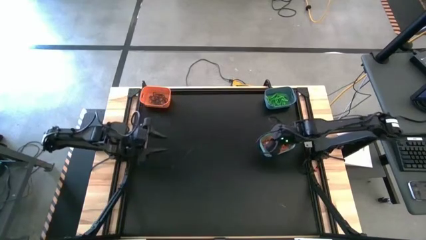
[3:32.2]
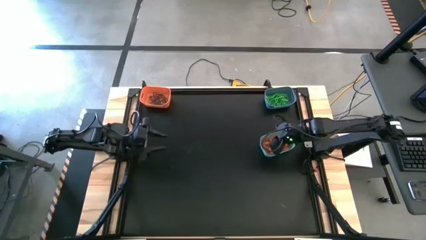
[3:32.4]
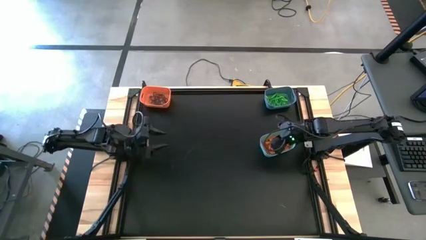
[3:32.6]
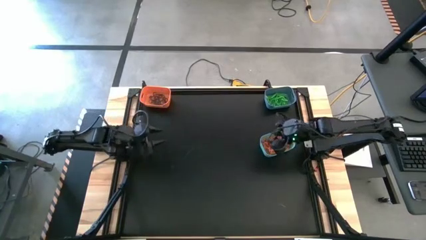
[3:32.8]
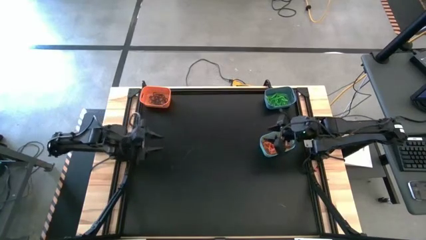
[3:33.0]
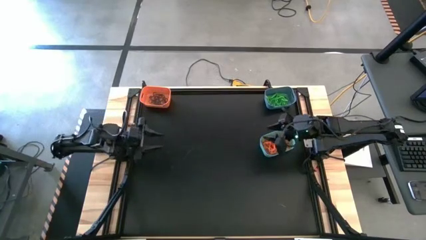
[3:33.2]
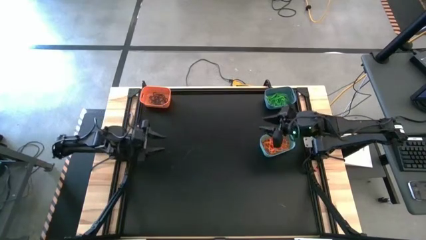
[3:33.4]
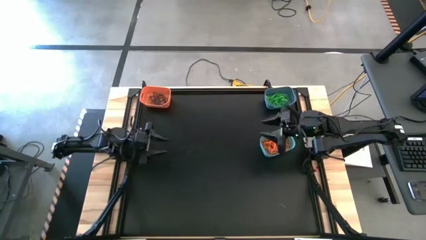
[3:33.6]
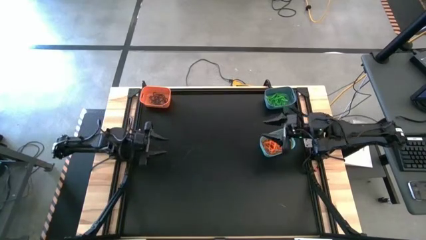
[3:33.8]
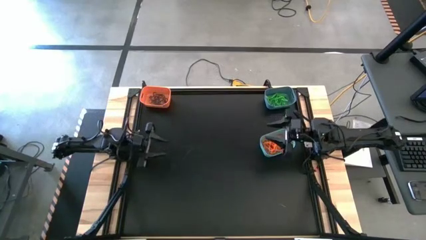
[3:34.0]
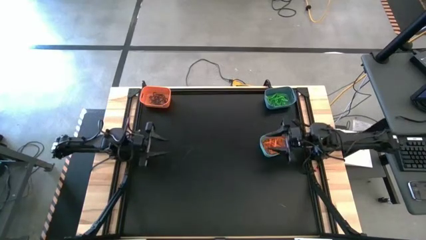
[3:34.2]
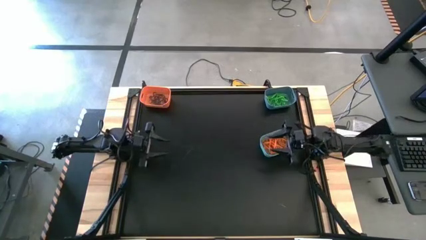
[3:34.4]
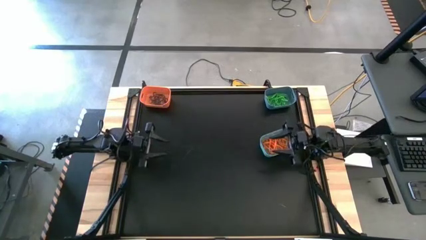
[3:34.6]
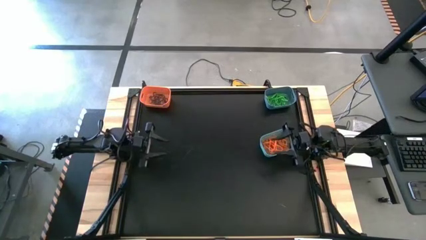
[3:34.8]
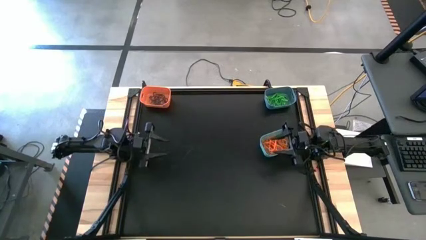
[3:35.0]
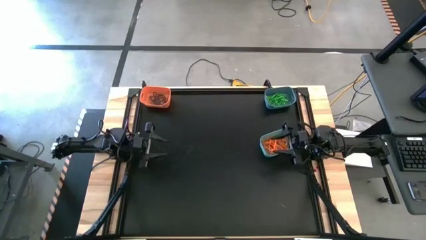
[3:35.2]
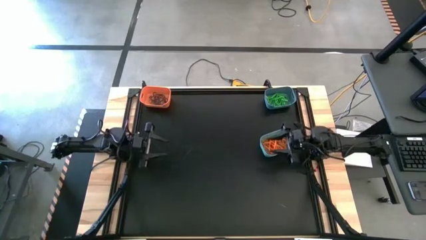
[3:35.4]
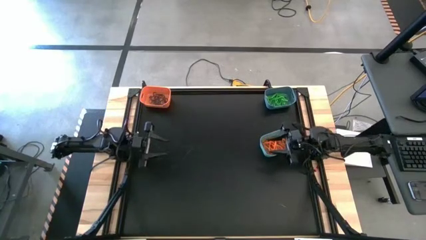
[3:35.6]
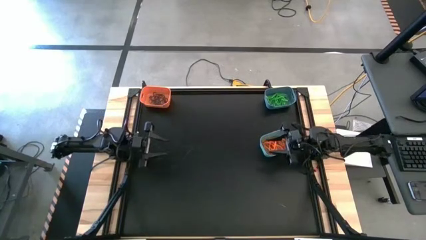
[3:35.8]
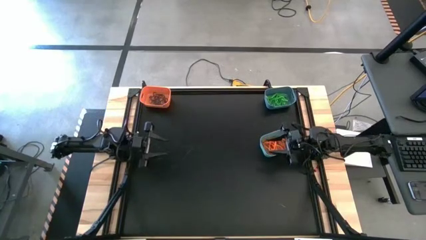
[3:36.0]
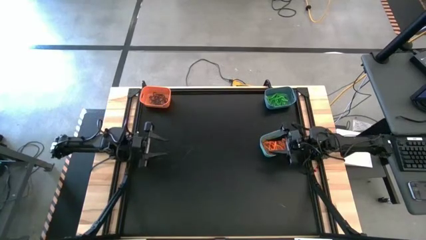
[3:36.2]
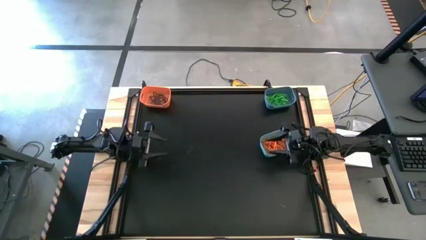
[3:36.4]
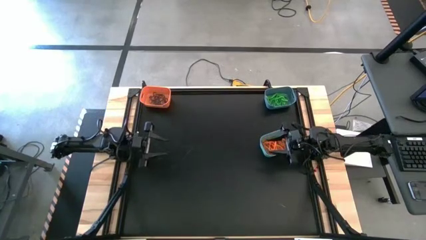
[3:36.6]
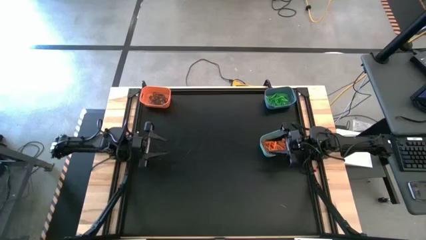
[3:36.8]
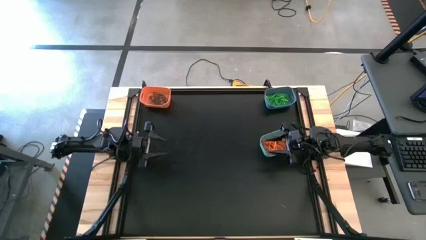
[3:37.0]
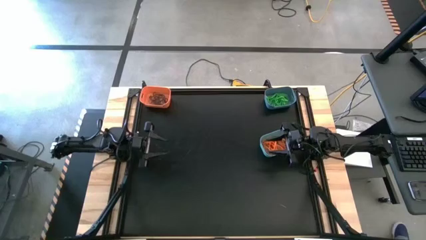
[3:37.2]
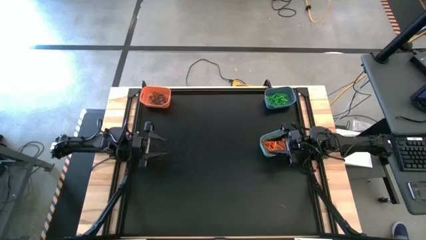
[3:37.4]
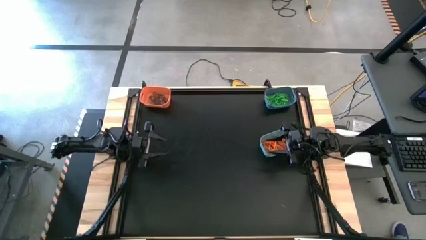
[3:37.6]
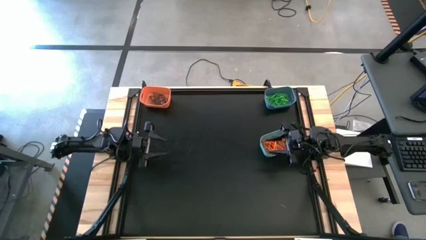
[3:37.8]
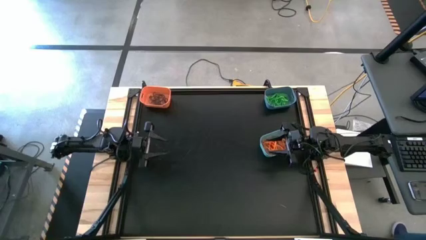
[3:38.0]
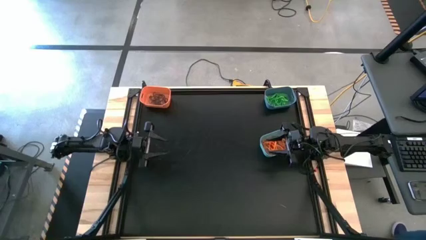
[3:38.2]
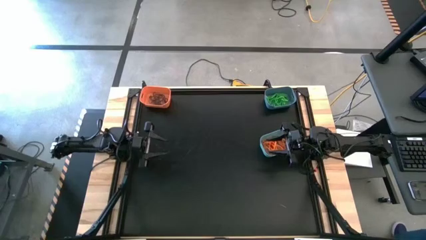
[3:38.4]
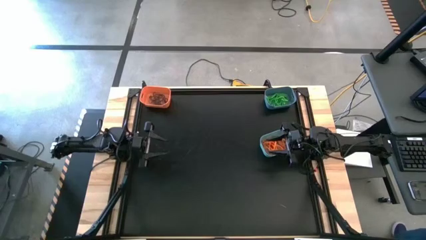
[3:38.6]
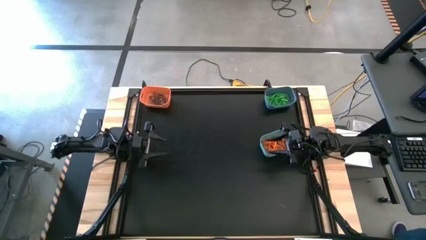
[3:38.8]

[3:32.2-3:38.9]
Task: Sort rubber bands into baskets
Return to Home Position

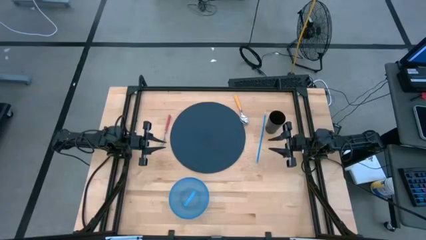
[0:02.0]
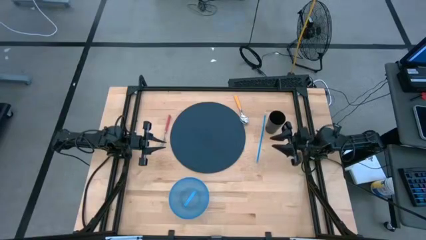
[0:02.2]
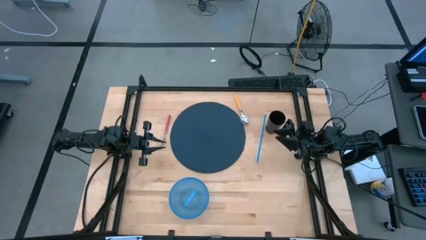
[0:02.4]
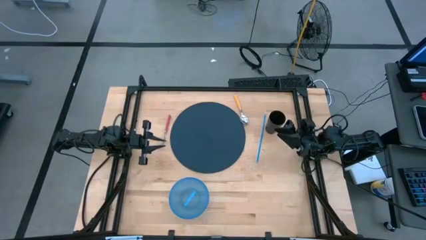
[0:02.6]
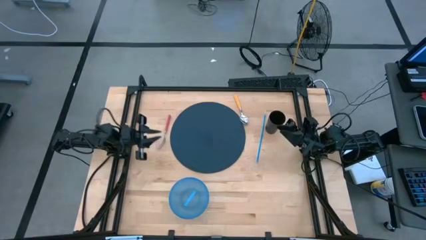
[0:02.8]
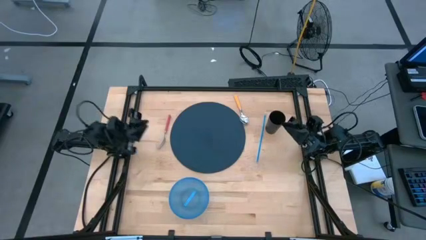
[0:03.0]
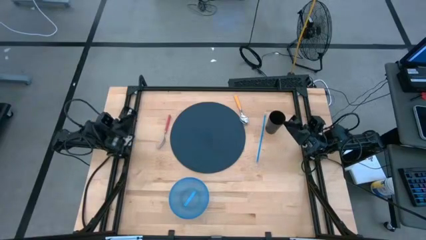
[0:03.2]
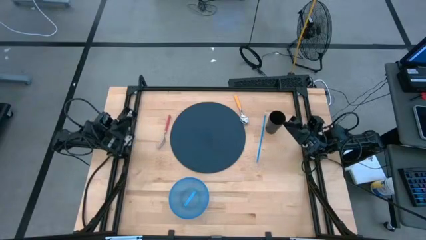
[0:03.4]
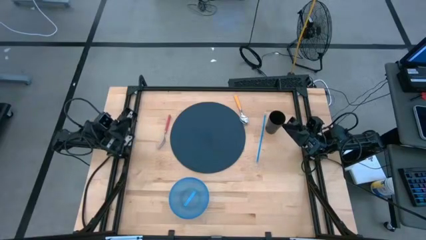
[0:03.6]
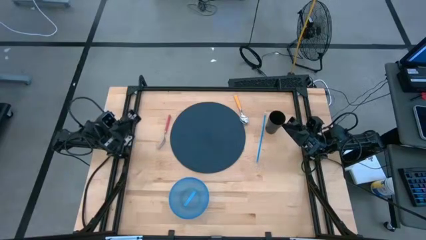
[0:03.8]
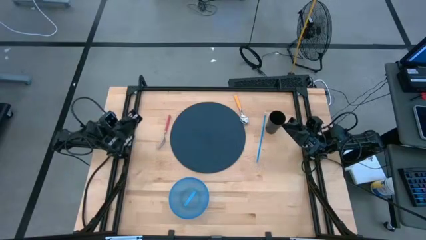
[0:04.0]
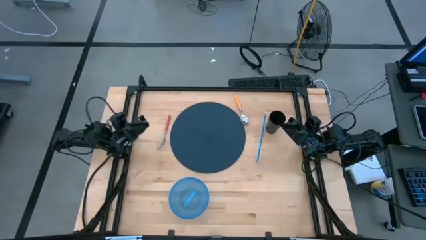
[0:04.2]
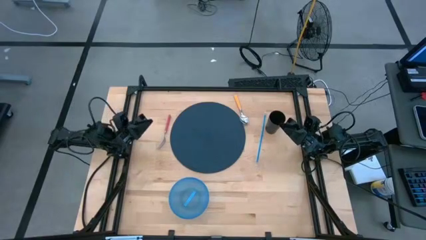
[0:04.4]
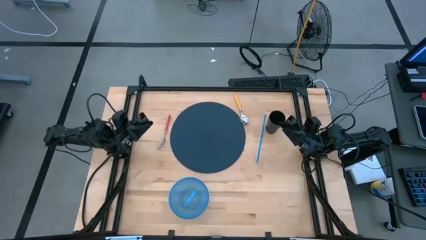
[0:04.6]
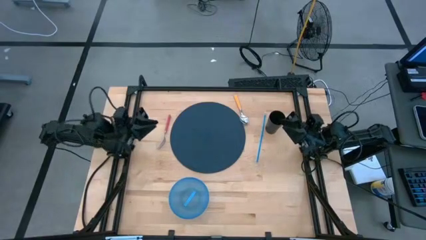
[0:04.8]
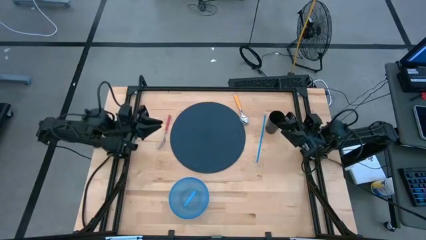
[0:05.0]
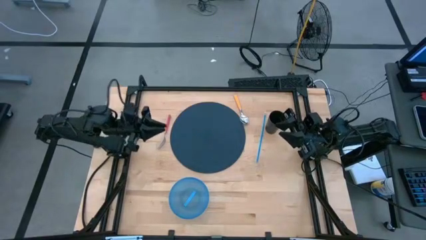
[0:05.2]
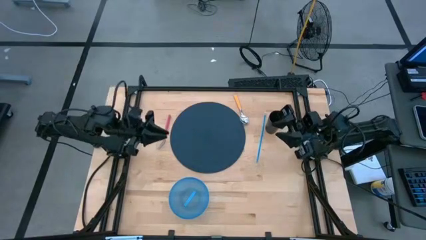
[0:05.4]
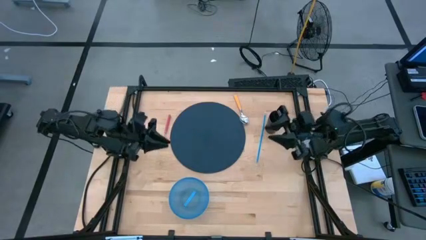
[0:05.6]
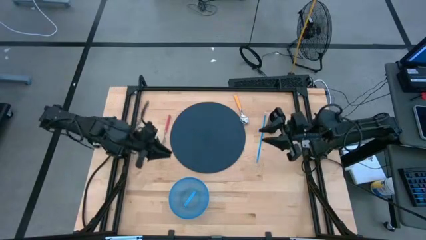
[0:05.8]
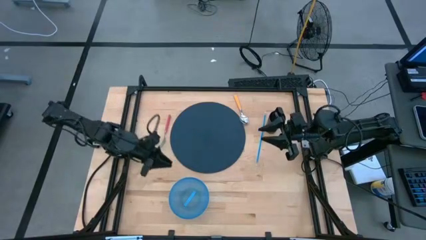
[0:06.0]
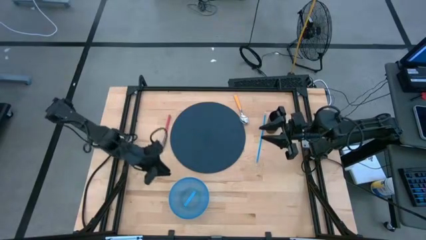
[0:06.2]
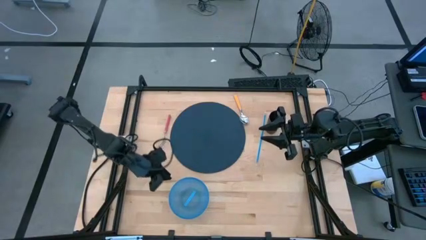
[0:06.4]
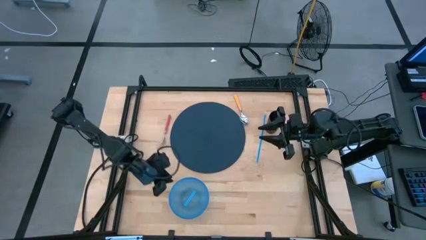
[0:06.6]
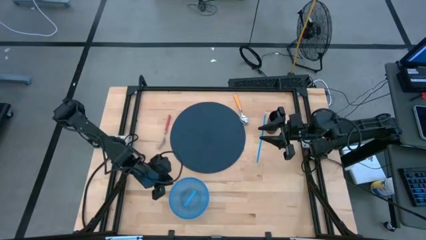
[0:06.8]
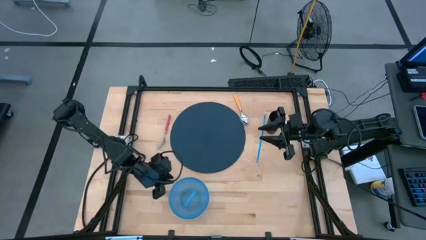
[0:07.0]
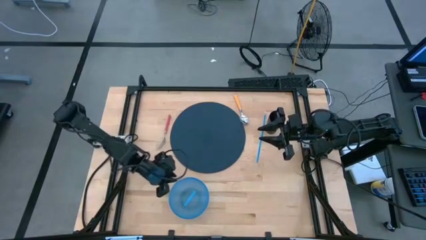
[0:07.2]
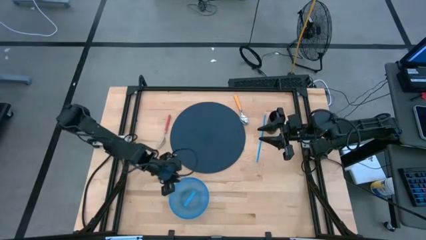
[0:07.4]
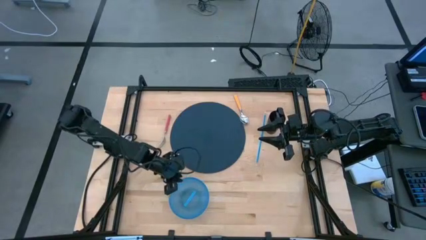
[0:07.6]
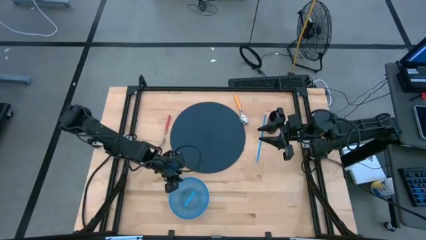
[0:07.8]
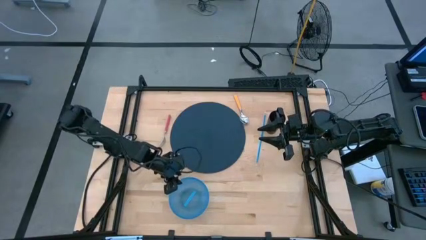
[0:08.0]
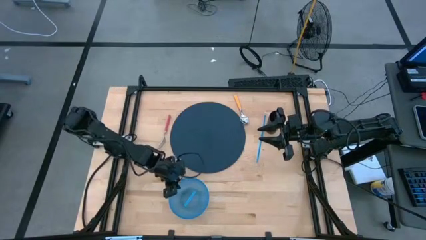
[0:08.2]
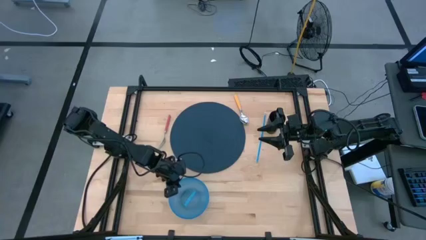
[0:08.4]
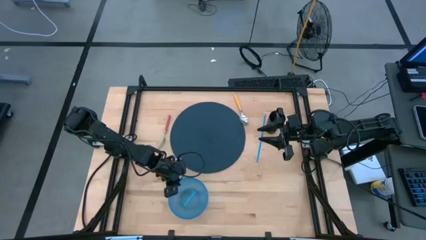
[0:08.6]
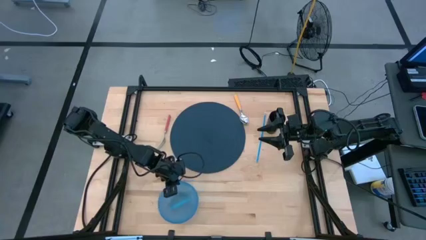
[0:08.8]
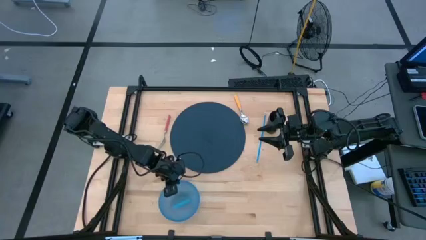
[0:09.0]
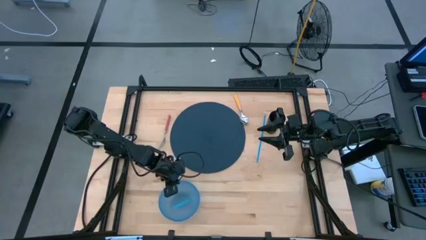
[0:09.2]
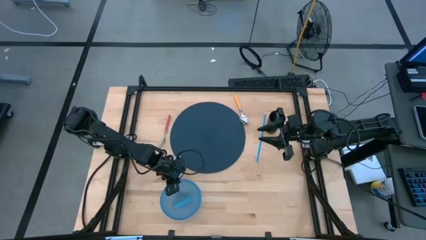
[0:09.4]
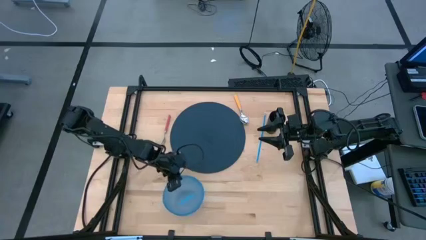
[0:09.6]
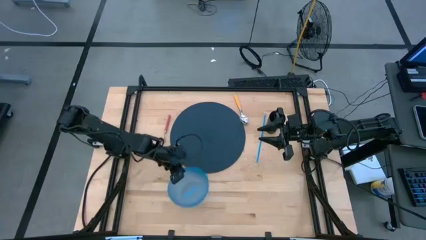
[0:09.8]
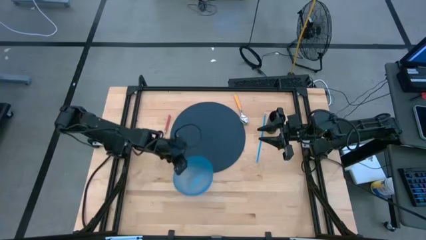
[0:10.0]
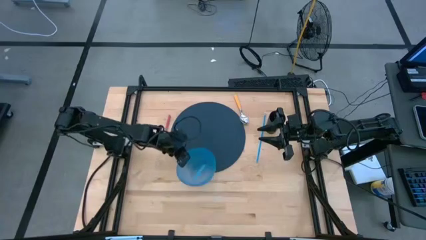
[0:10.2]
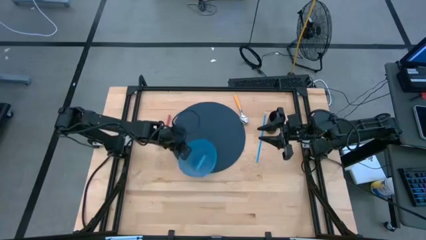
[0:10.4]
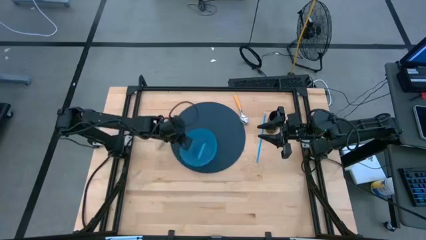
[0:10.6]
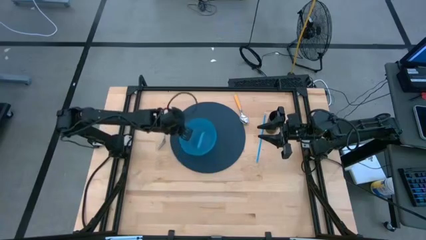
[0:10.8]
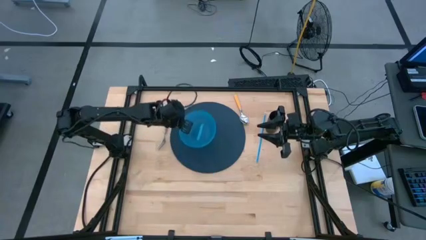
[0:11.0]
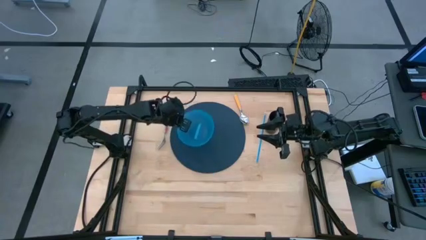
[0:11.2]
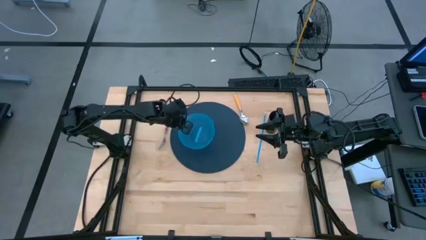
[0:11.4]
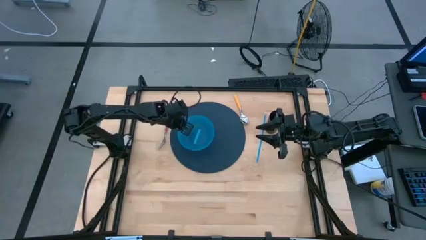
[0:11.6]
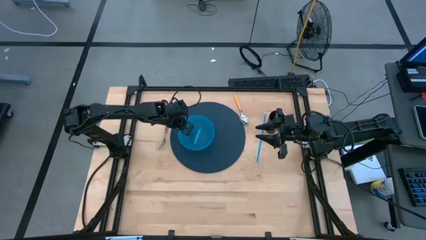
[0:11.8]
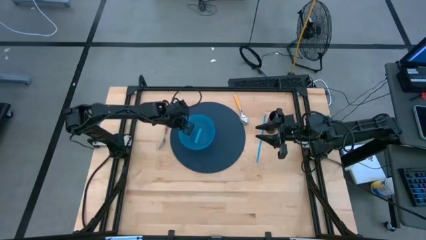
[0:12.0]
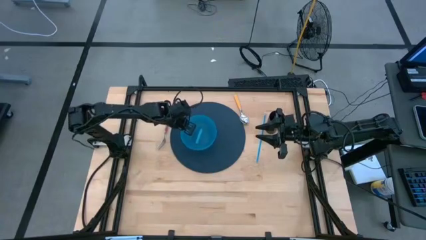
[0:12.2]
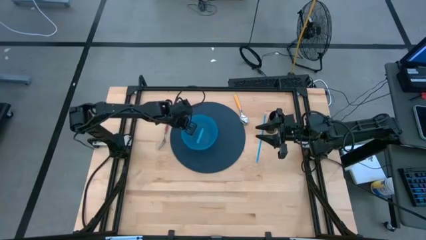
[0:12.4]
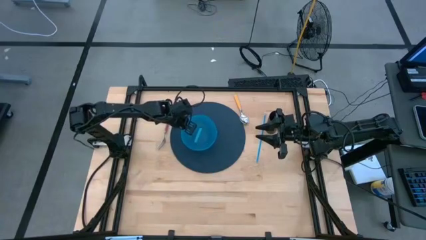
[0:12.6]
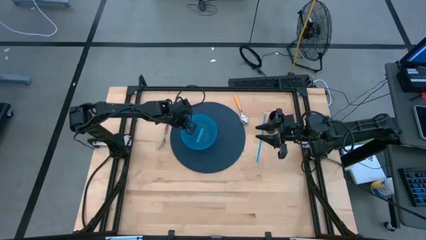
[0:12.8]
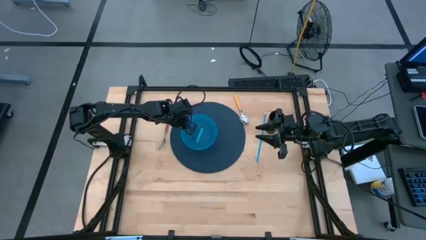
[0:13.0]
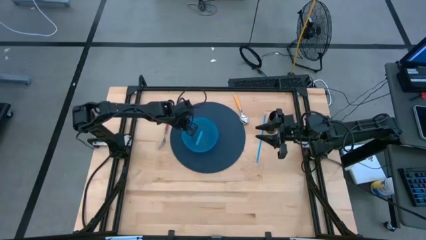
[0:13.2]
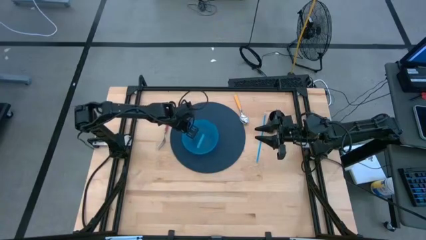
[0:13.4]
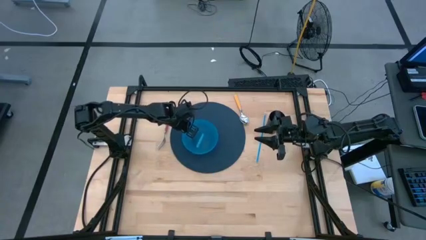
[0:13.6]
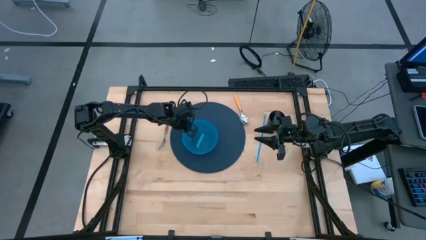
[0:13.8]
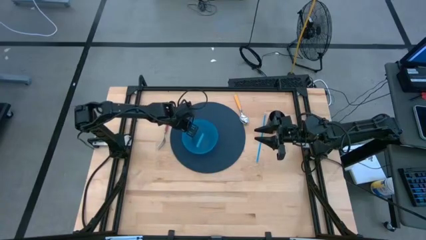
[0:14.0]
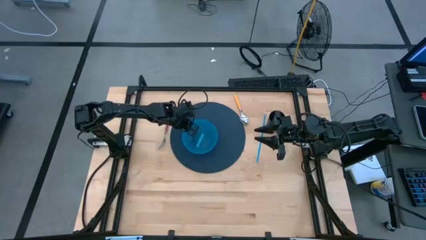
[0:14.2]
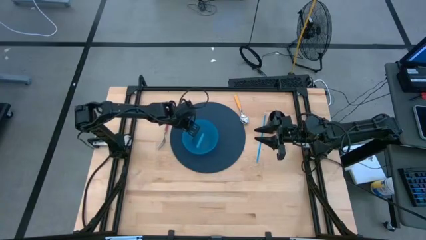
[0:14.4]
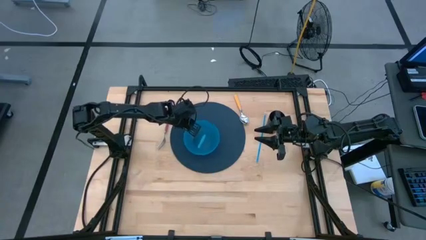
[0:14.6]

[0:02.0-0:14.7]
Task: Pick & Place Utensil
Put the blue bowl on the blue mat
